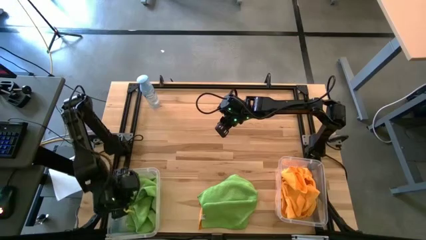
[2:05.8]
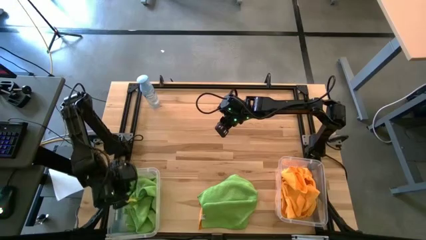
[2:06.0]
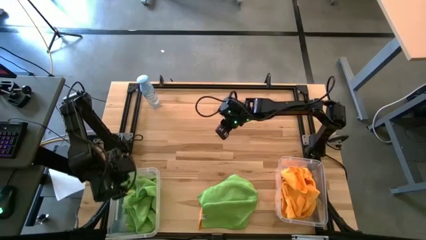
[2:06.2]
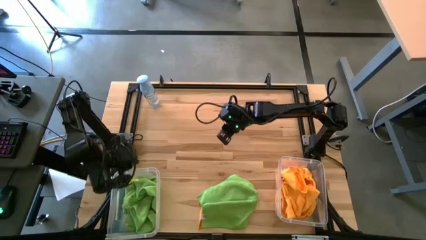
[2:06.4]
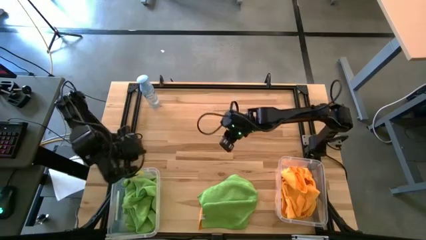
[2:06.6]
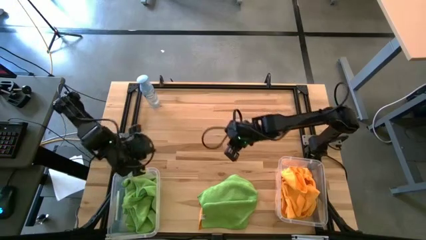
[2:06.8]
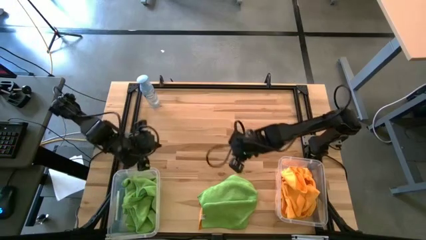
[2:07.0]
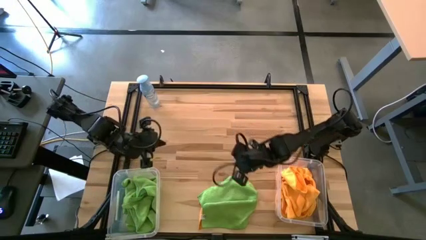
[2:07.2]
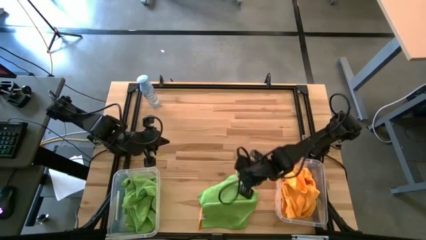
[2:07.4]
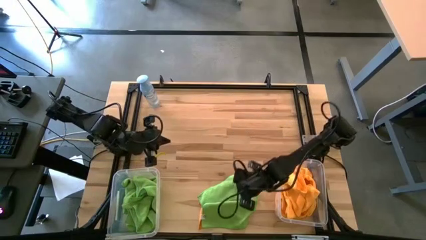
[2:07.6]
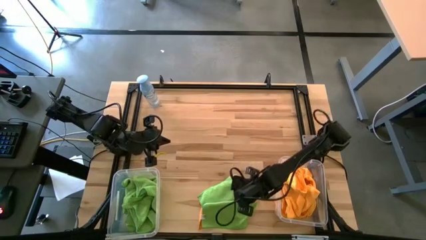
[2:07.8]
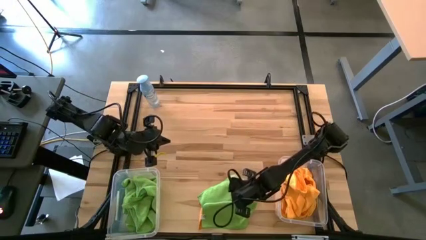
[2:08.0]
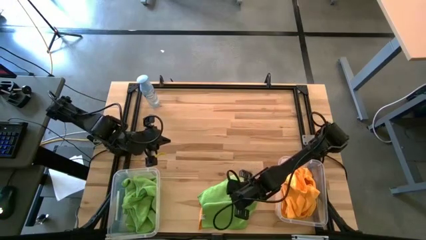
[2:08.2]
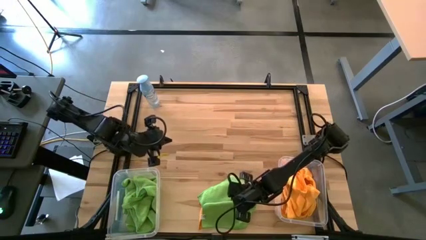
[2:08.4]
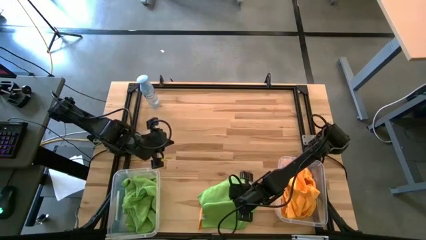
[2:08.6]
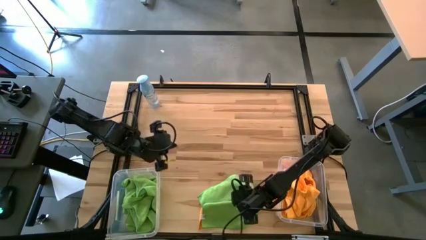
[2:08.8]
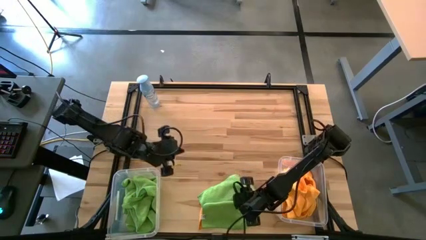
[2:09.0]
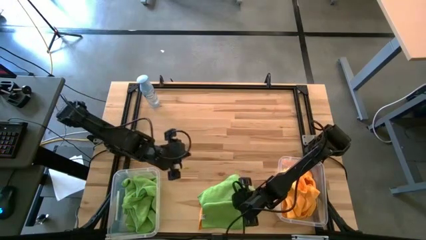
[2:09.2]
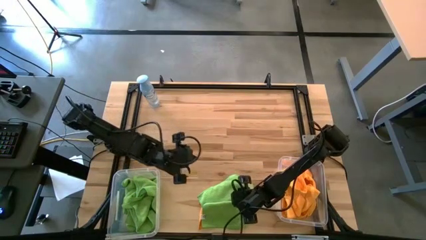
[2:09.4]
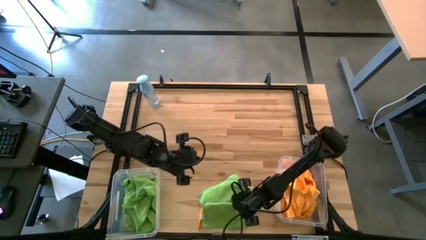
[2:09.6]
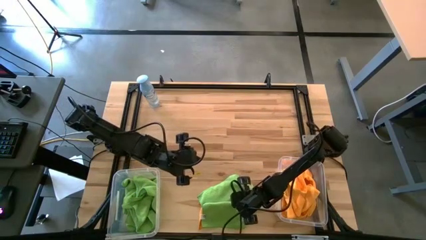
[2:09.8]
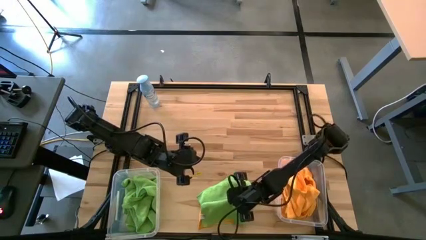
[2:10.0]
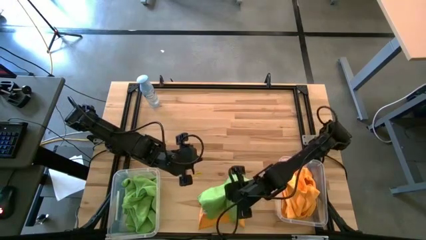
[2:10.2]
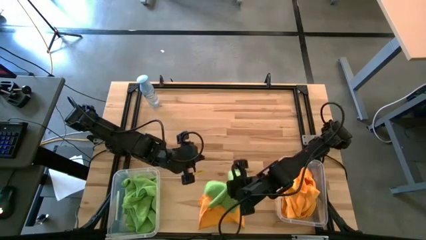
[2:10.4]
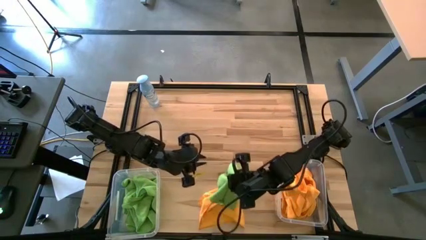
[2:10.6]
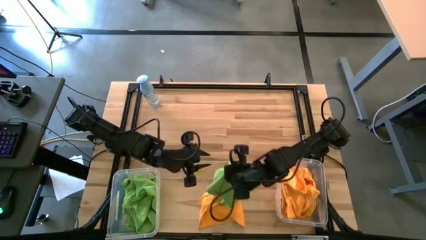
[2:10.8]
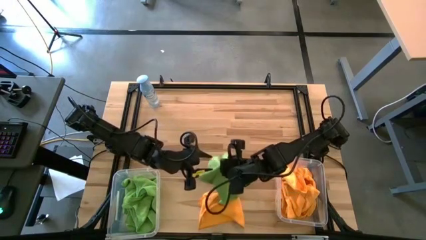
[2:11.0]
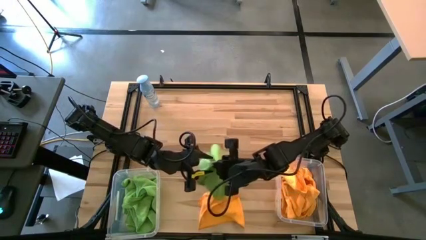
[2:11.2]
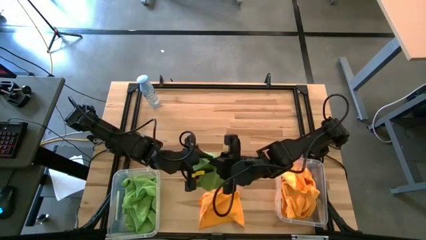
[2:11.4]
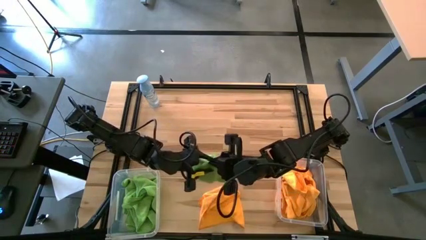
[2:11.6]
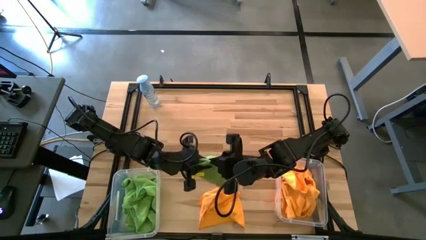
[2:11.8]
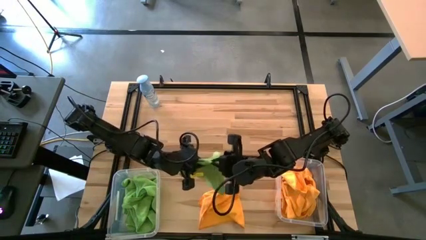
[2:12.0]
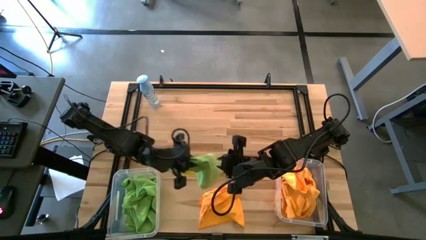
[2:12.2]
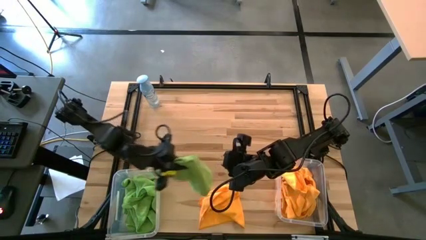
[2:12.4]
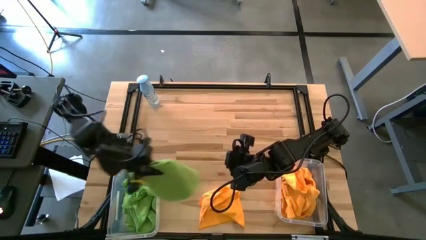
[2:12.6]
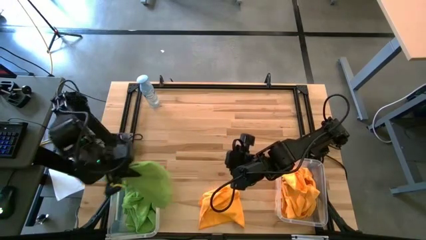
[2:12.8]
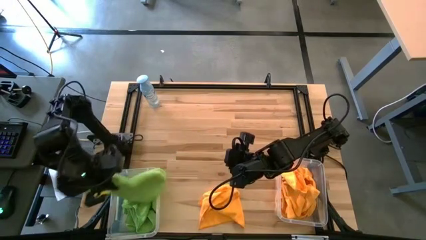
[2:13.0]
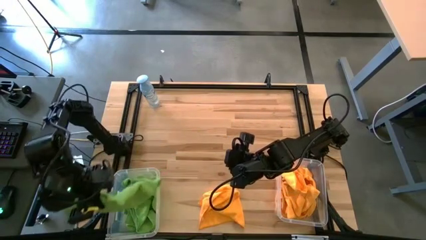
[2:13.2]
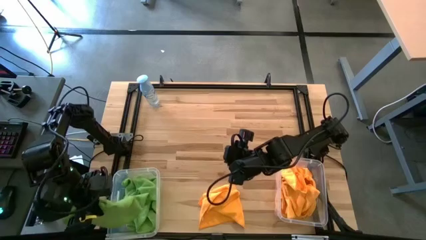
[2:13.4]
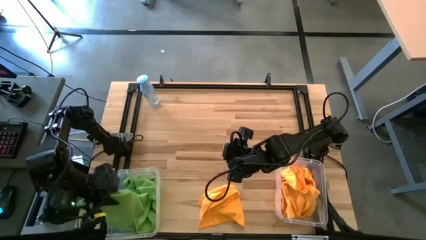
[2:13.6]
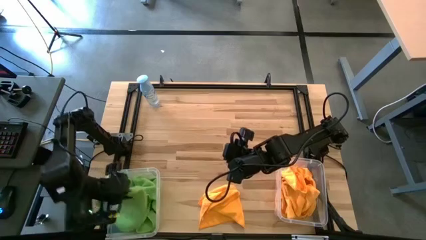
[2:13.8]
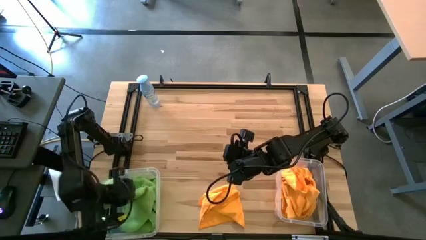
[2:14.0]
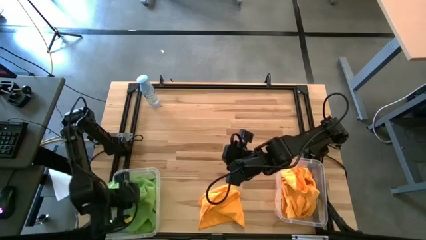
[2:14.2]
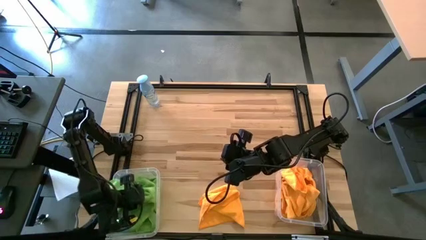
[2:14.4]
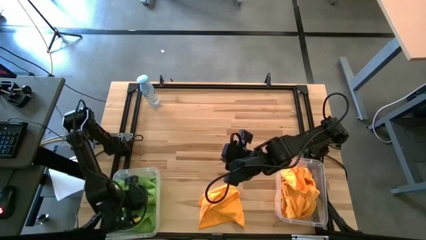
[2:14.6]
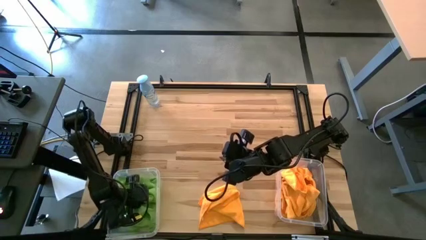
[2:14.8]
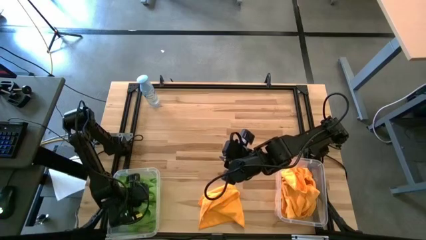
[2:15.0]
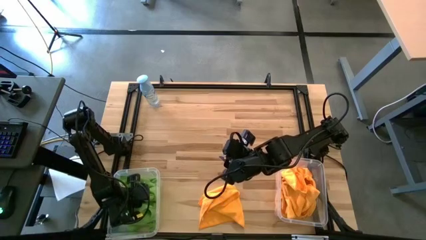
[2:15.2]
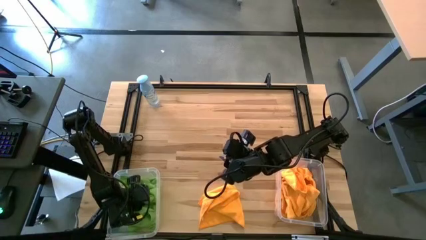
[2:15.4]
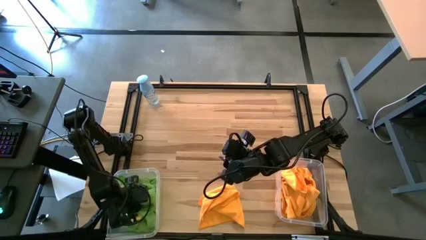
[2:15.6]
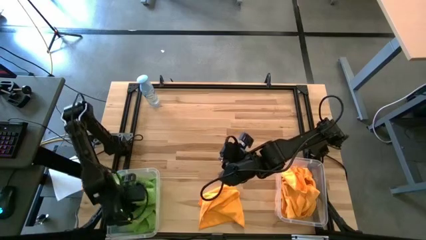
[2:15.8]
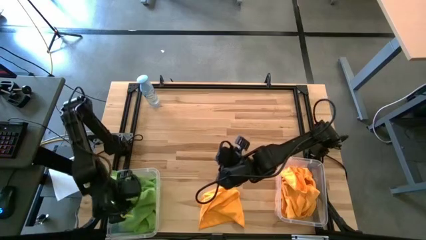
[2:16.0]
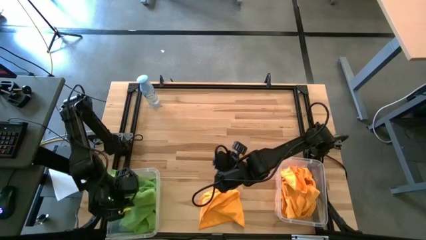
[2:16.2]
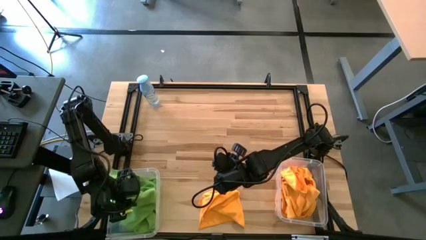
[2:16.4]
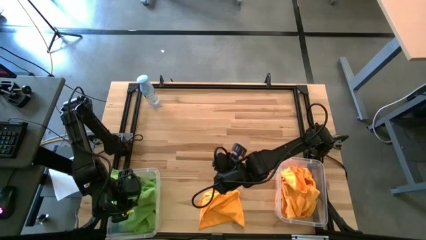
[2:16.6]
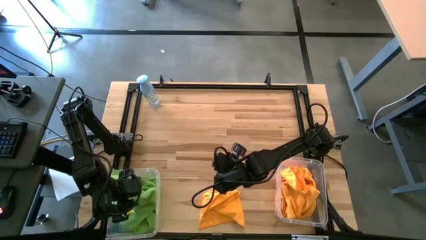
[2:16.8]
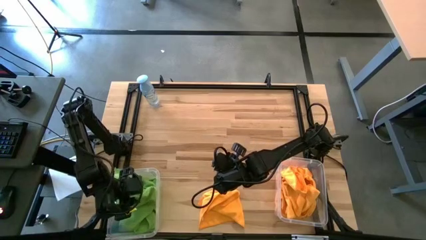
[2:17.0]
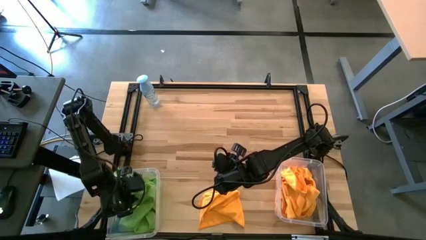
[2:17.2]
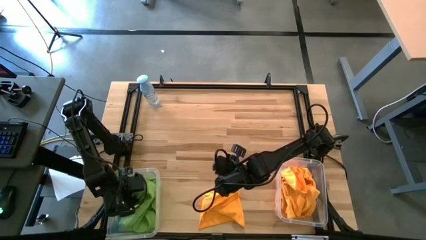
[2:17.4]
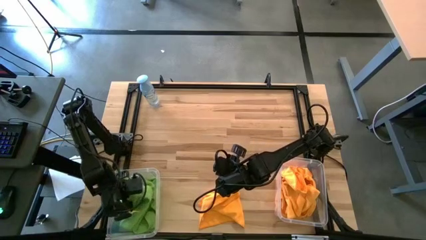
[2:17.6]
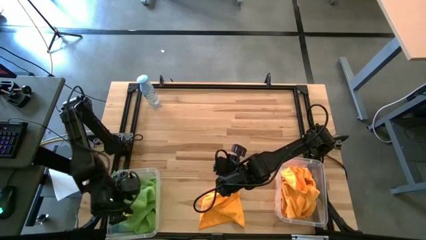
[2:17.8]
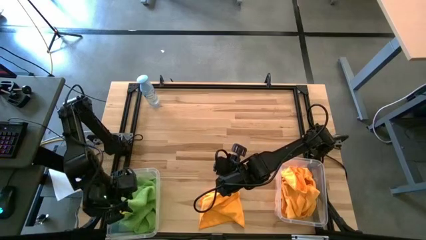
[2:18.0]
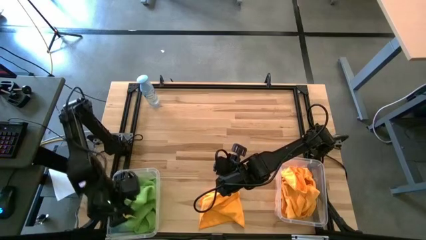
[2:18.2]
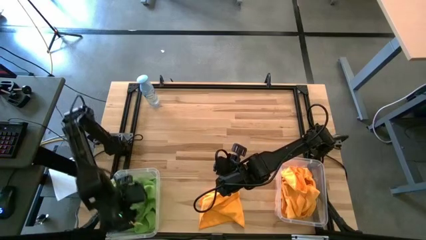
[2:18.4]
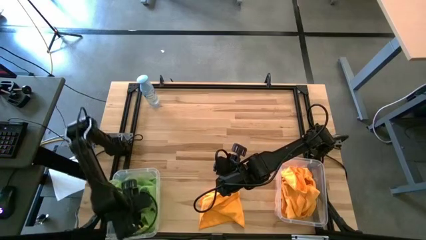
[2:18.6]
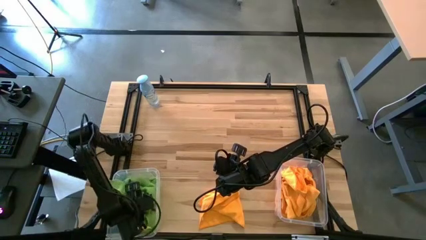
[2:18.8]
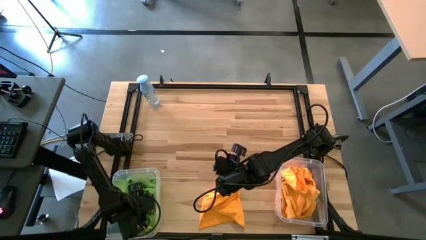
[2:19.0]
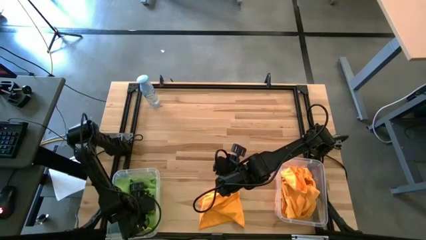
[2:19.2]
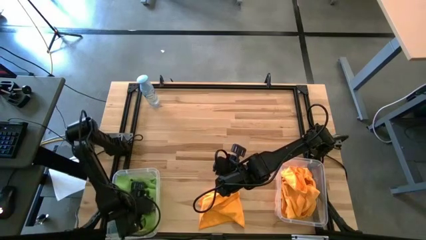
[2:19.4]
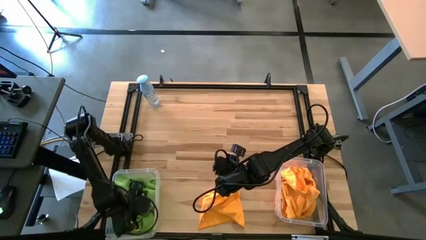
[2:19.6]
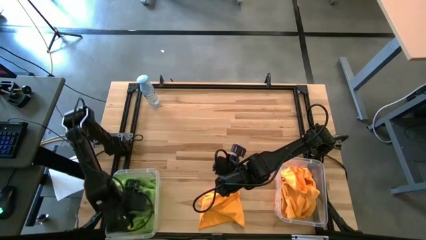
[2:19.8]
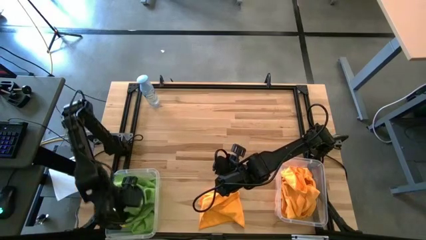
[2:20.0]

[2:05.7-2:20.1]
Task: Sort microfiber towel by color & place in baskets
Put the green towel into the left transparent bin
